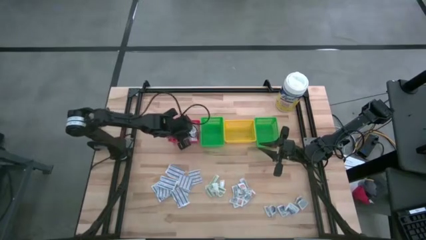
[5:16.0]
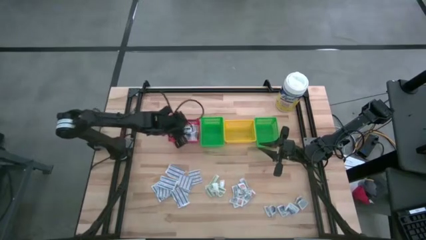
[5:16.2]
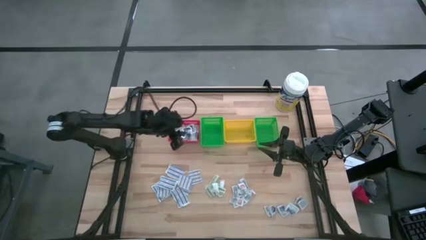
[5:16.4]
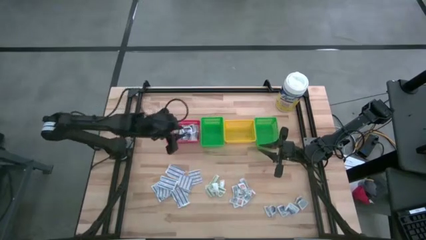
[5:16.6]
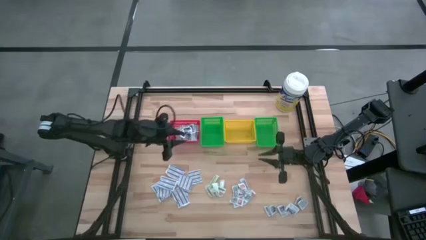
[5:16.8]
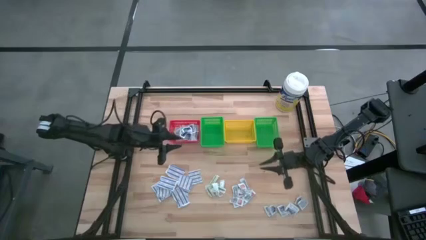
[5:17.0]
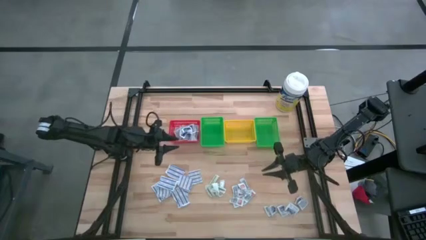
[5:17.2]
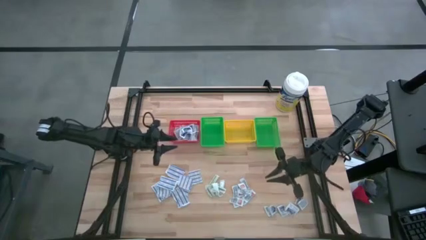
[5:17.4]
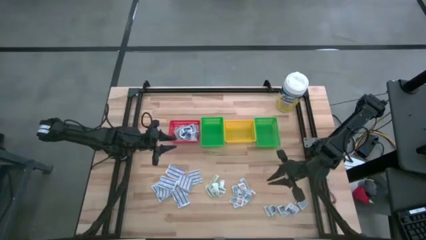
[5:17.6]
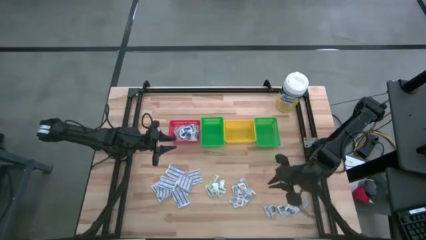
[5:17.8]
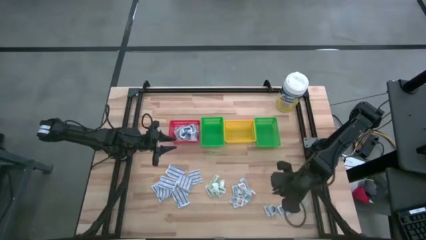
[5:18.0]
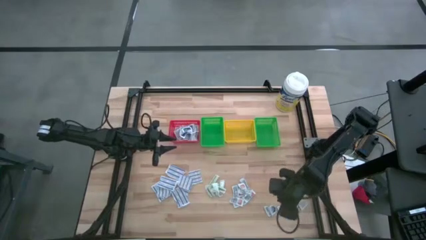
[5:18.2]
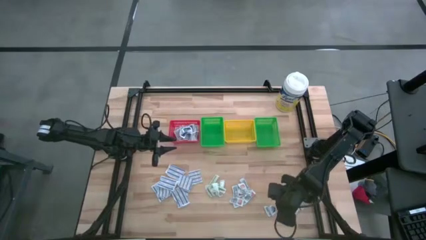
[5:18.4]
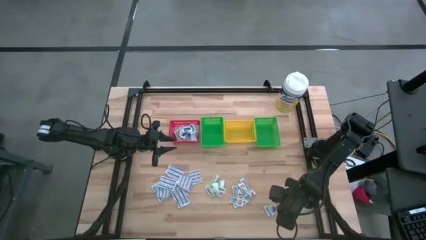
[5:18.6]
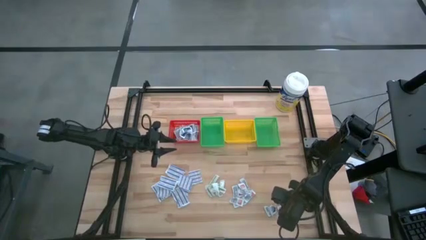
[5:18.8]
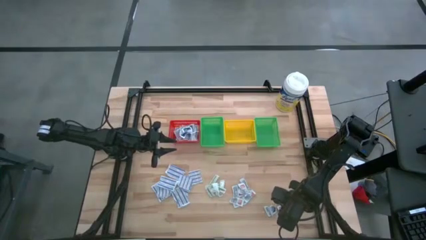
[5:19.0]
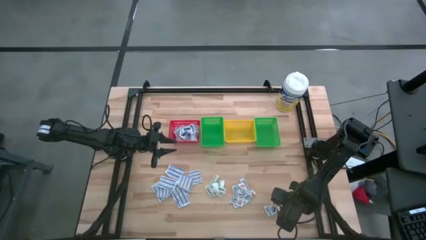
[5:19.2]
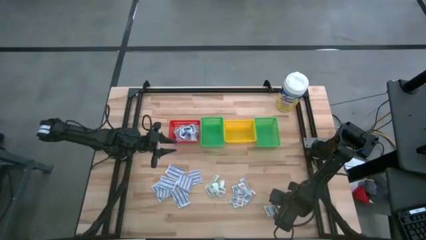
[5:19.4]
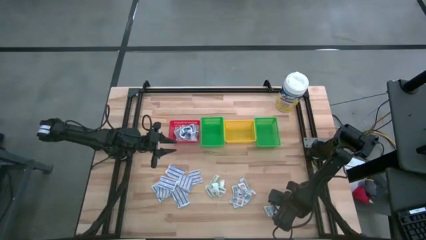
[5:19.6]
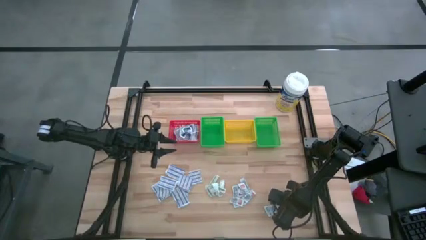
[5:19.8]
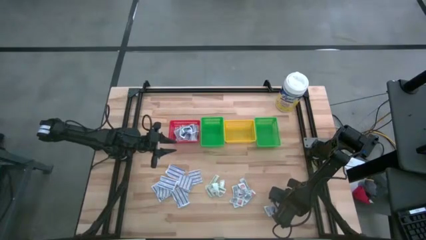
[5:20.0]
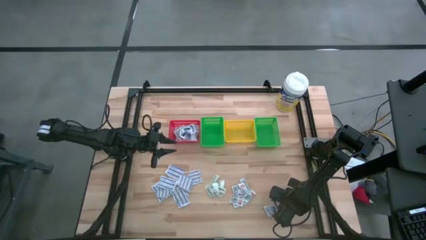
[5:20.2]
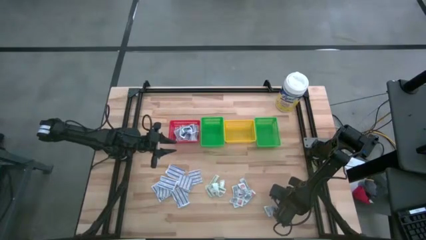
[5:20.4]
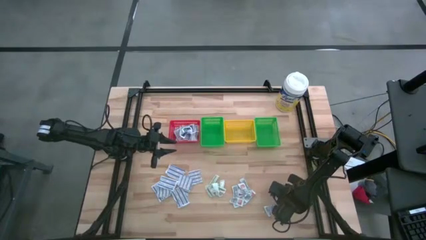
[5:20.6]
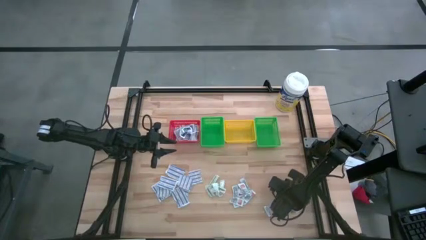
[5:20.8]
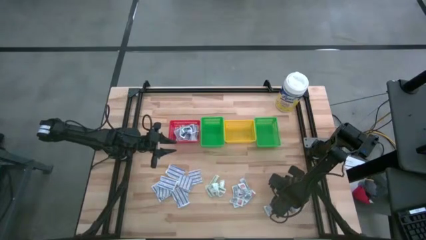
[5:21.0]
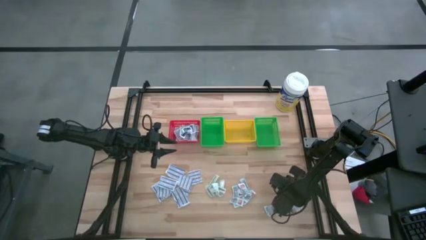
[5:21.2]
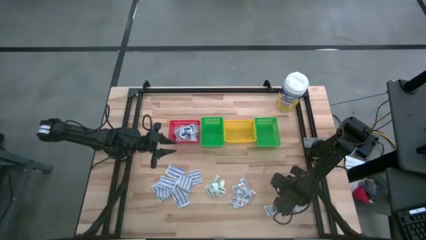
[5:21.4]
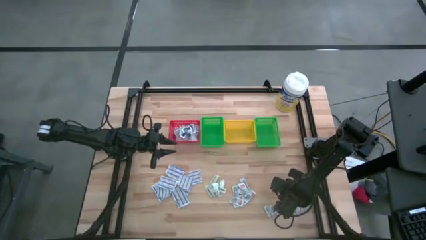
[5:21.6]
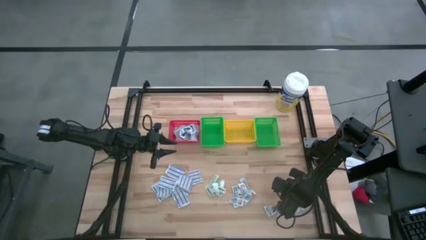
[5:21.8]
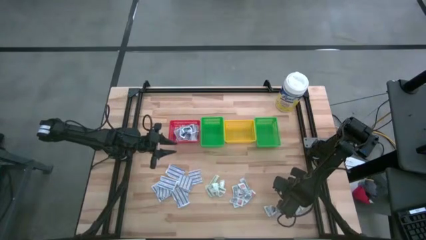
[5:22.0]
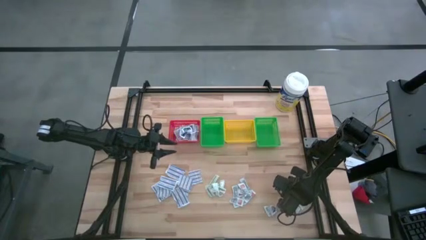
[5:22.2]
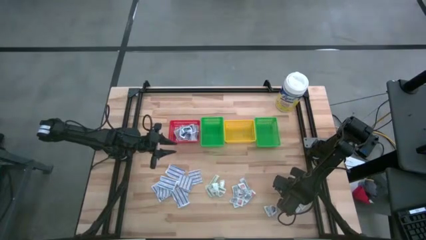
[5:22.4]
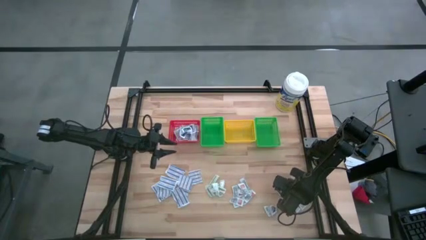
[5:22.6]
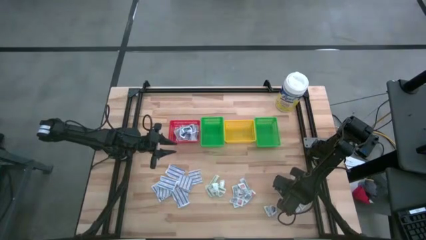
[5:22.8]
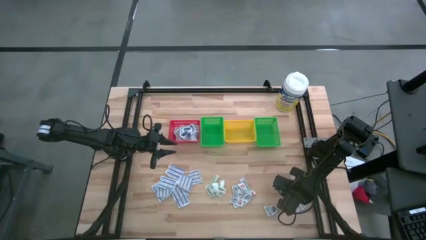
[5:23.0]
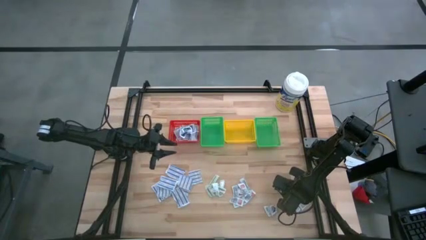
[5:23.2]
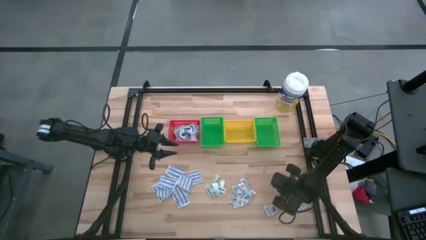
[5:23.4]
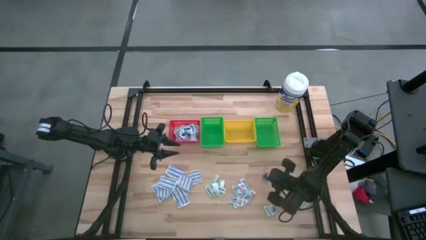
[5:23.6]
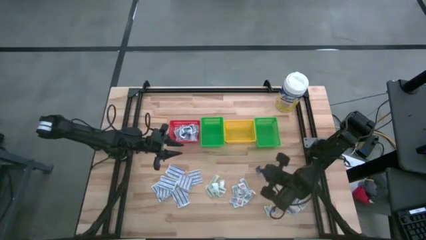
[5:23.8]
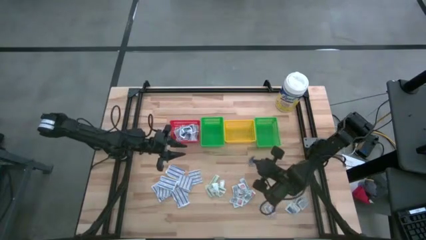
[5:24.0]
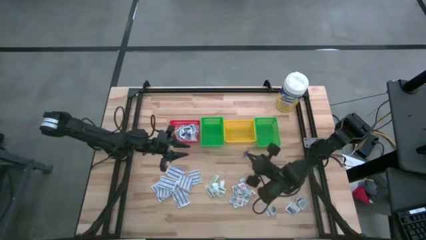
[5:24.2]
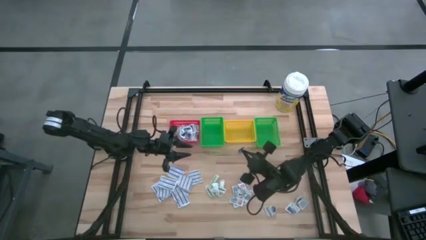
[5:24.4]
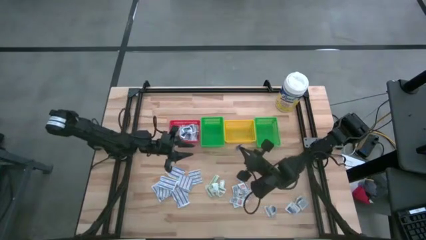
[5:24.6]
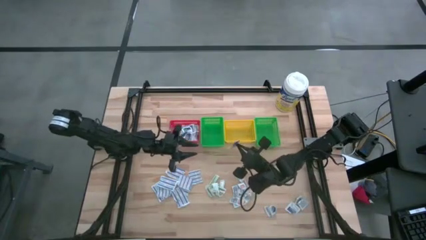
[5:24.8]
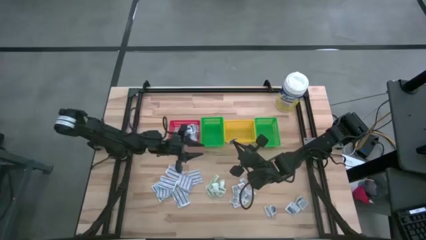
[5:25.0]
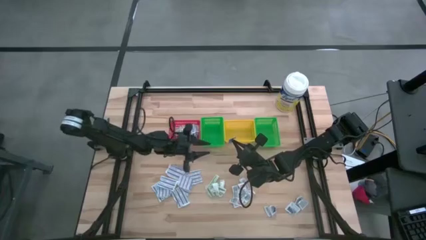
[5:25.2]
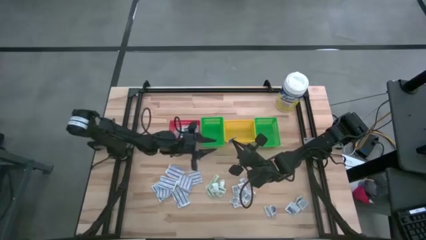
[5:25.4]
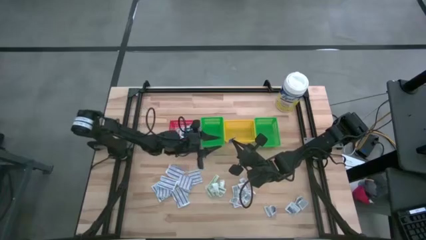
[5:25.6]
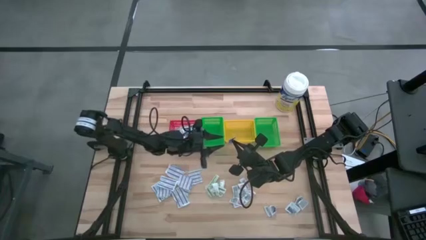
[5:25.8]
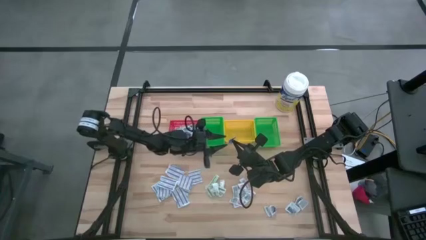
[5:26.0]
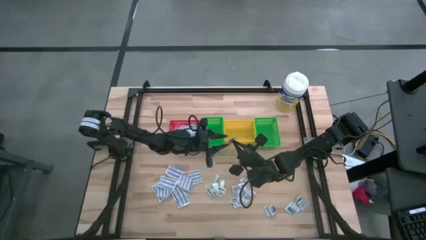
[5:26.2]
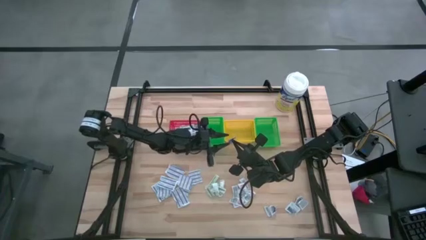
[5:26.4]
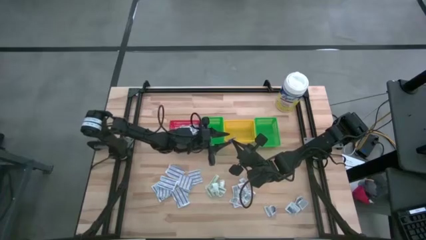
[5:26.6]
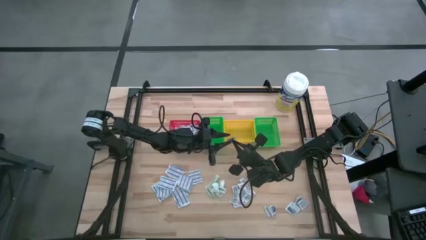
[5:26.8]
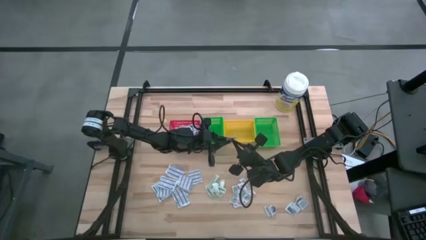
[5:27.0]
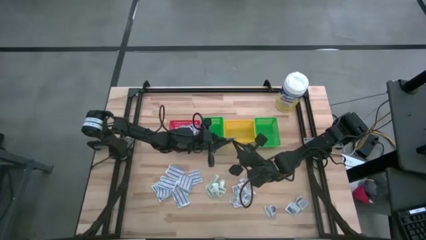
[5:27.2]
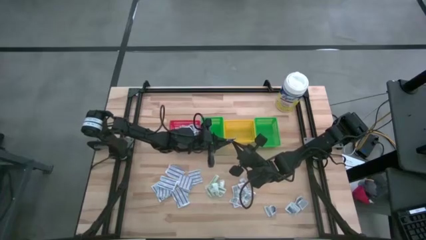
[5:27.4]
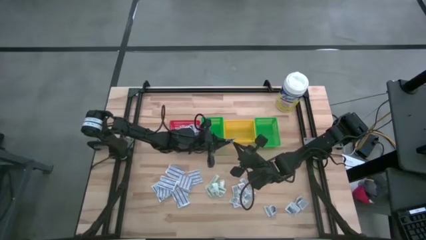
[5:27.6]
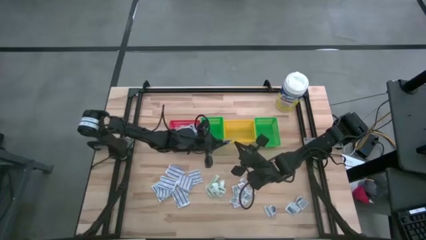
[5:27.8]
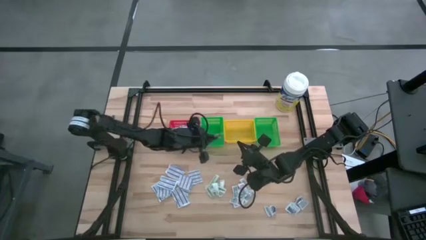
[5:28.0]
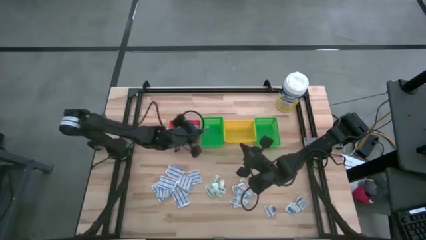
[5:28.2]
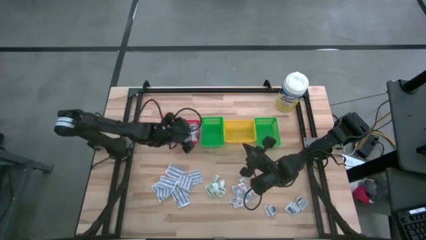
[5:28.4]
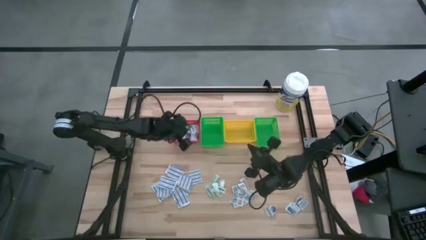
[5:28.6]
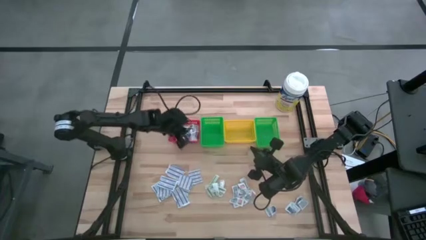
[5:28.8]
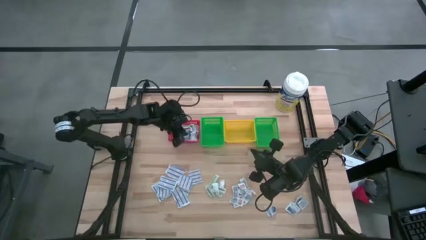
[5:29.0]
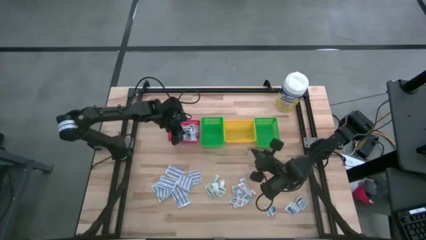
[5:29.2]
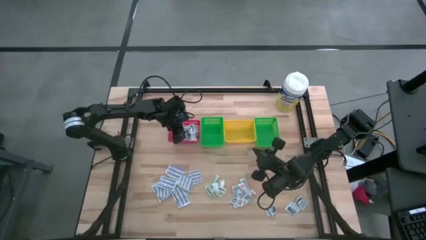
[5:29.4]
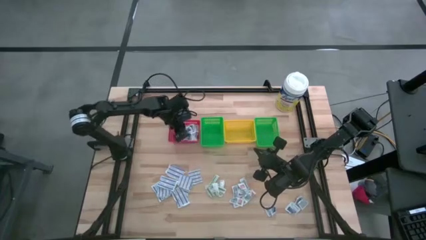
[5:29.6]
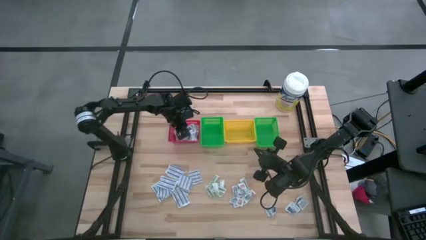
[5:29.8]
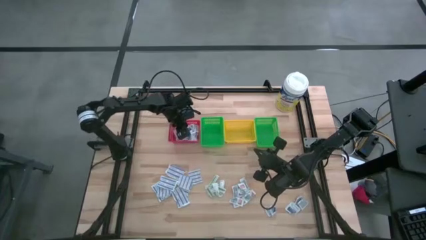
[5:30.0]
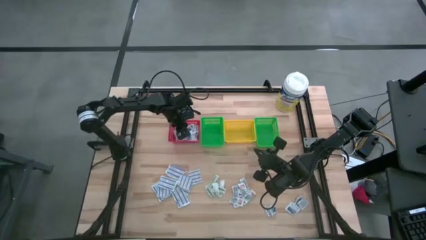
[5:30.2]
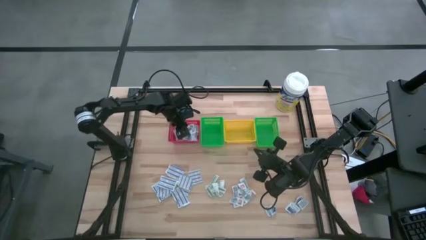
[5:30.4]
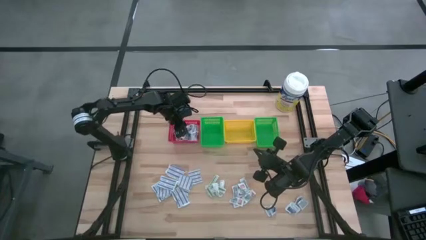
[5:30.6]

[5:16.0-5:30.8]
Task: Pick & Place First Aid Supplies
Put the alcohol pad into the red basket
